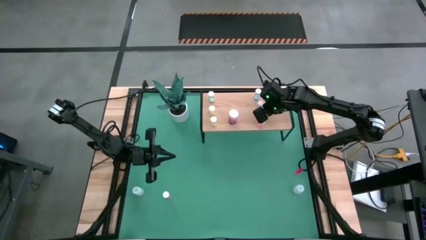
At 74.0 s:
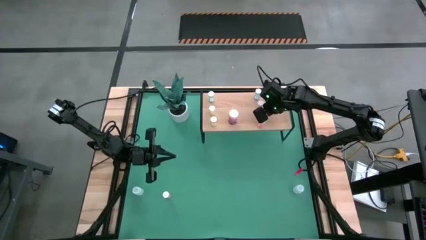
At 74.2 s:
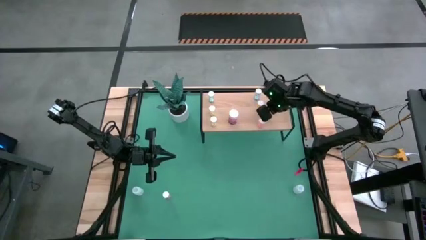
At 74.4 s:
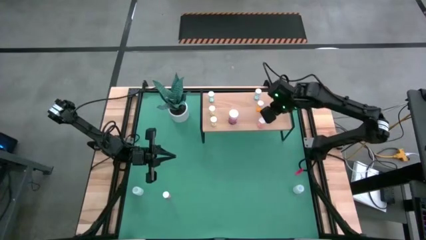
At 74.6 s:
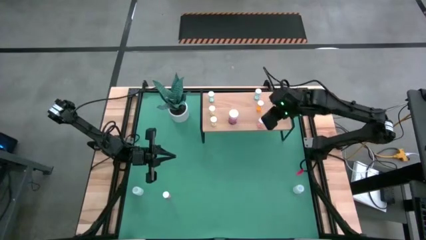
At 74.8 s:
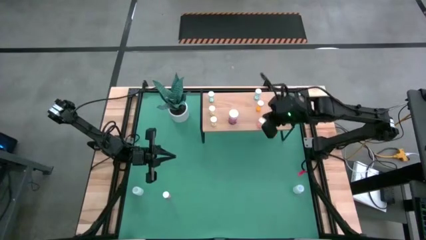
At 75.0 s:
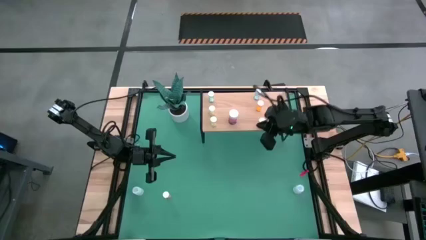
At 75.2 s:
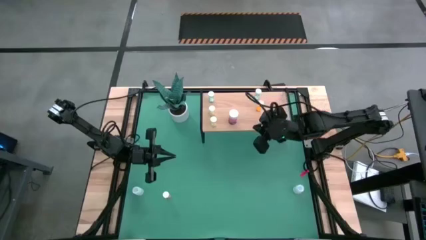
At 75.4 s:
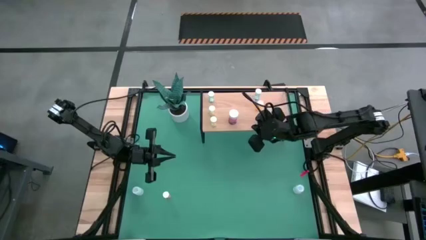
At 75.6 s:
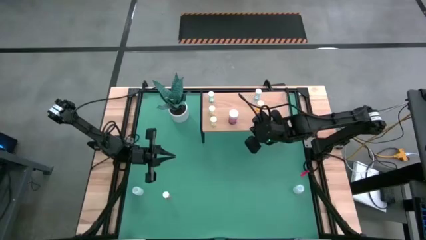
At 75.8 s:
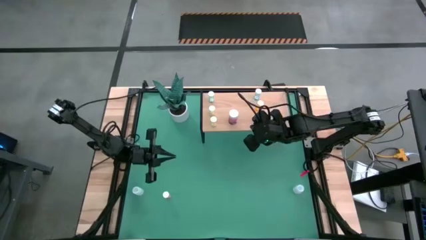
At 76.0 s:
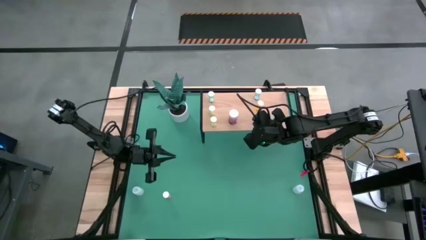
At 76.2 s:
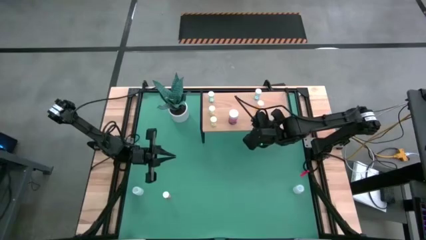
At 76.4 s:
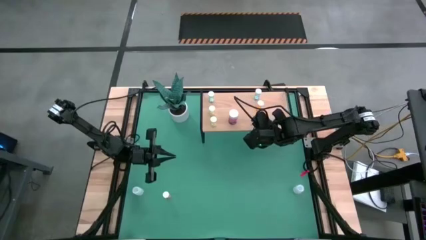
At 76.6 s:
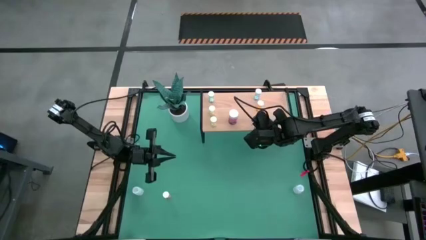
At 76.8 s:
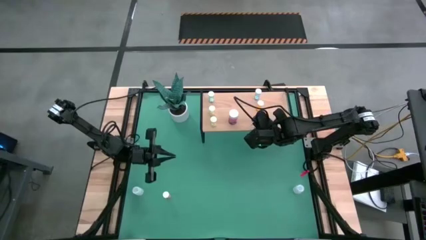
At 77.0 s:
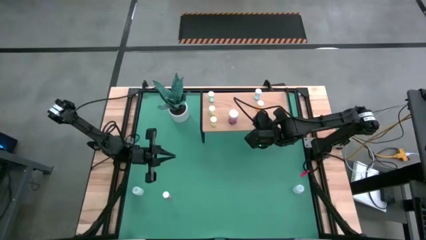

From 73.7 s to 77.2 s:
Task: Pick and place medicine bottles onto shelf by color
Adjust the light pink medicine bottle on the shelf

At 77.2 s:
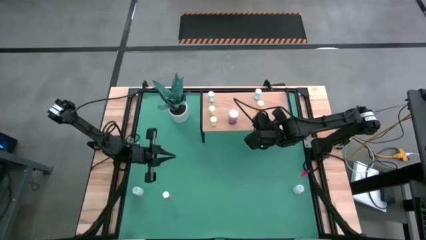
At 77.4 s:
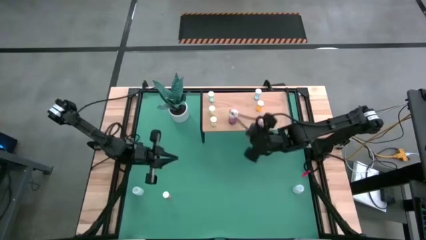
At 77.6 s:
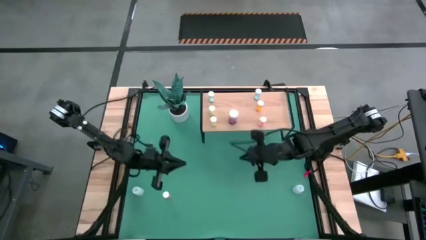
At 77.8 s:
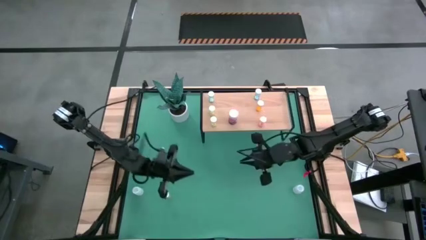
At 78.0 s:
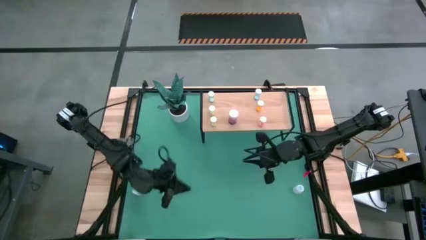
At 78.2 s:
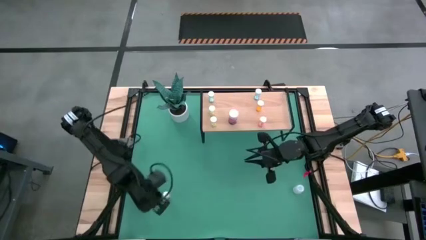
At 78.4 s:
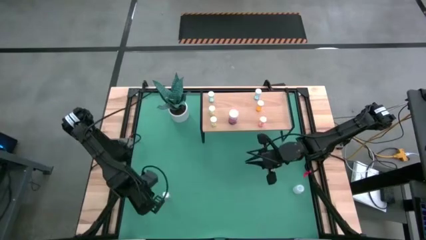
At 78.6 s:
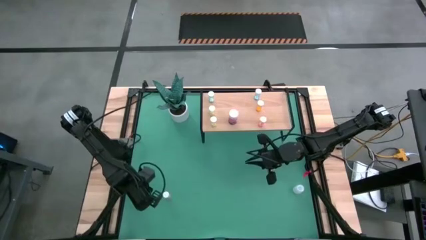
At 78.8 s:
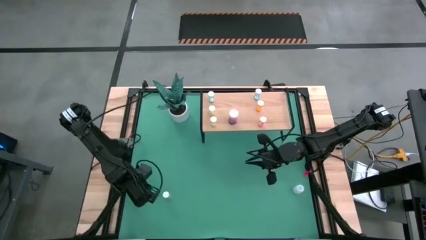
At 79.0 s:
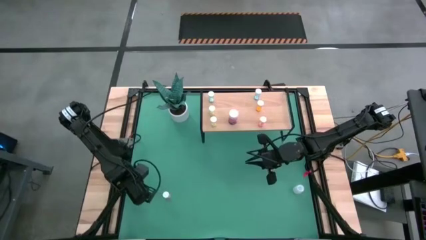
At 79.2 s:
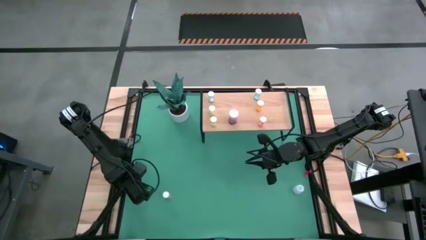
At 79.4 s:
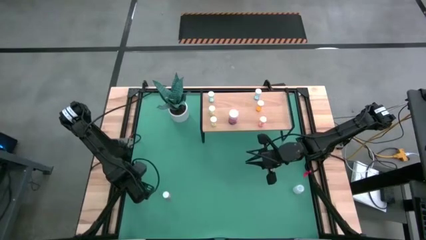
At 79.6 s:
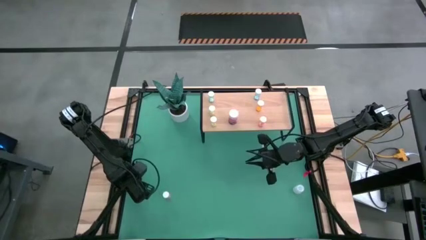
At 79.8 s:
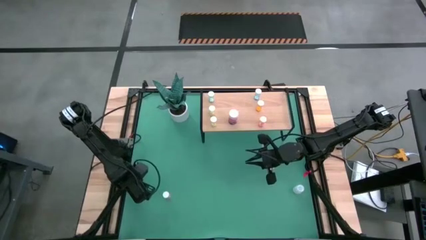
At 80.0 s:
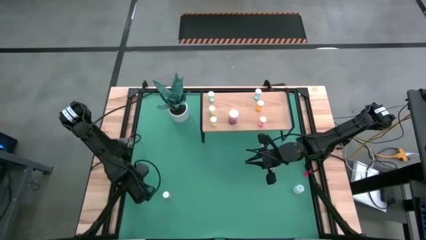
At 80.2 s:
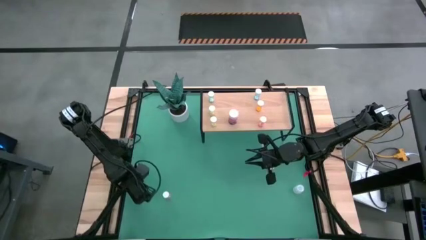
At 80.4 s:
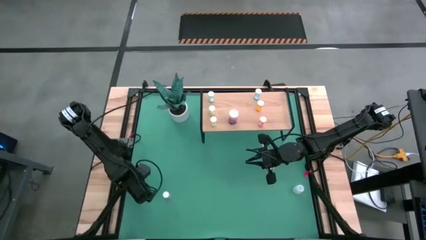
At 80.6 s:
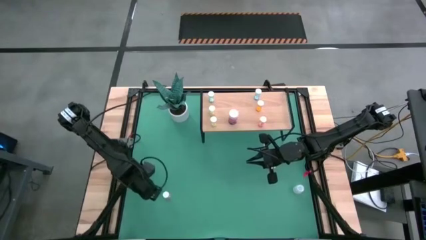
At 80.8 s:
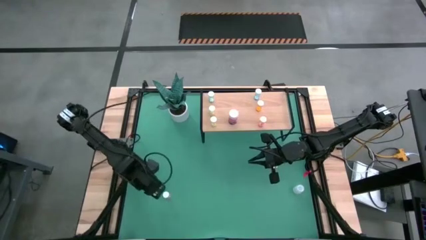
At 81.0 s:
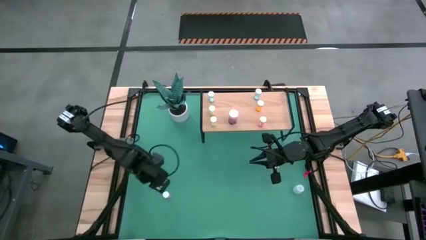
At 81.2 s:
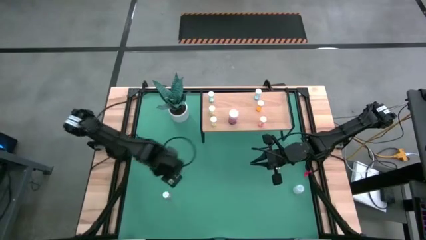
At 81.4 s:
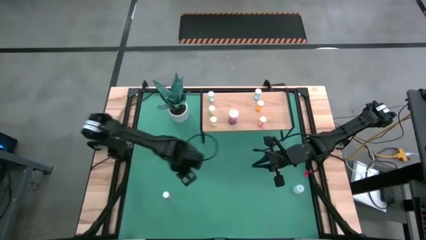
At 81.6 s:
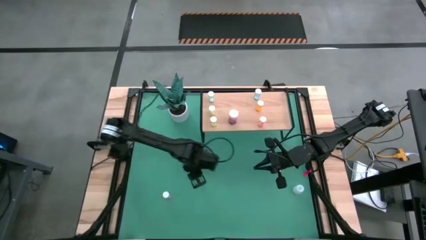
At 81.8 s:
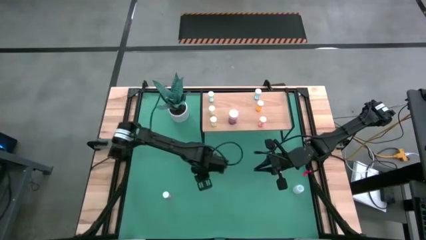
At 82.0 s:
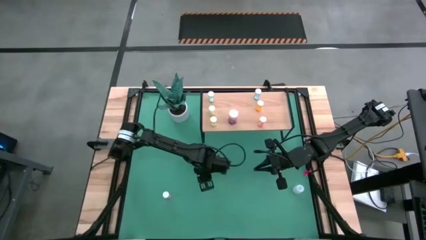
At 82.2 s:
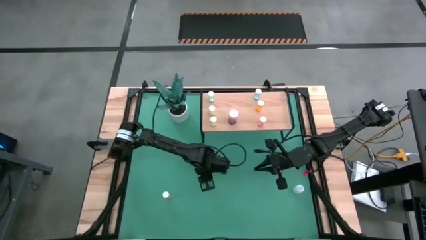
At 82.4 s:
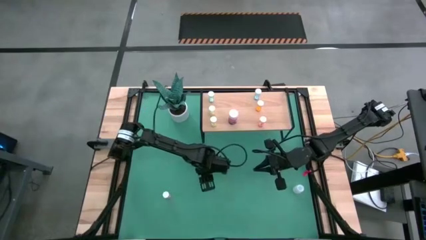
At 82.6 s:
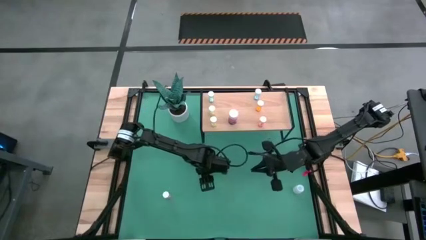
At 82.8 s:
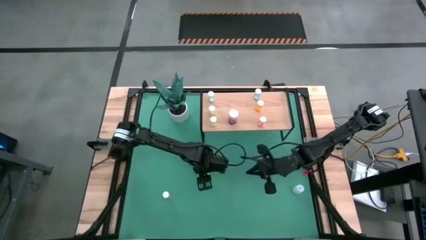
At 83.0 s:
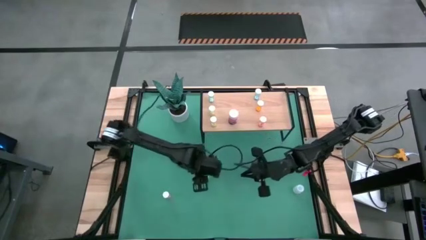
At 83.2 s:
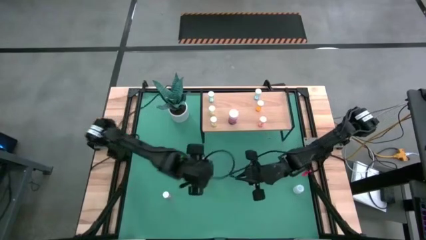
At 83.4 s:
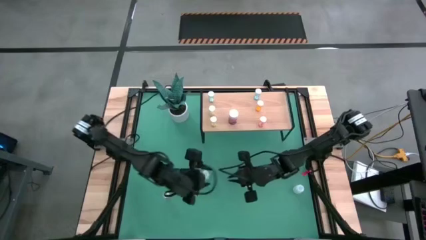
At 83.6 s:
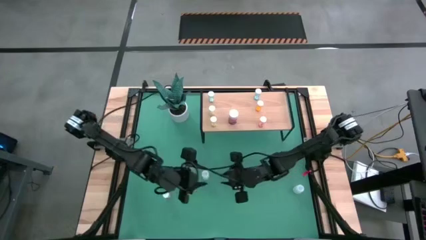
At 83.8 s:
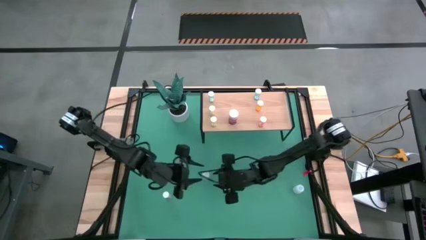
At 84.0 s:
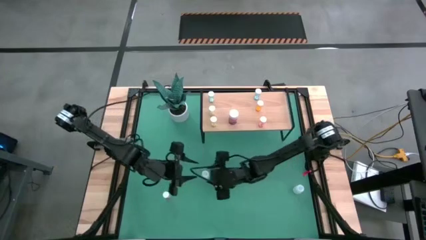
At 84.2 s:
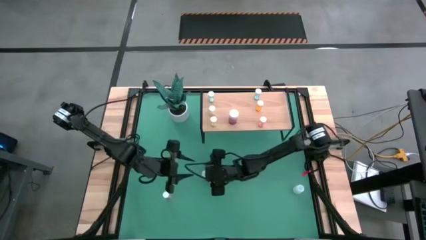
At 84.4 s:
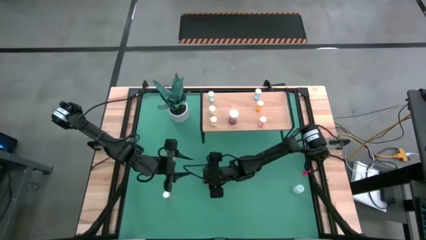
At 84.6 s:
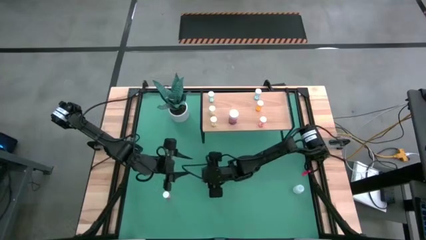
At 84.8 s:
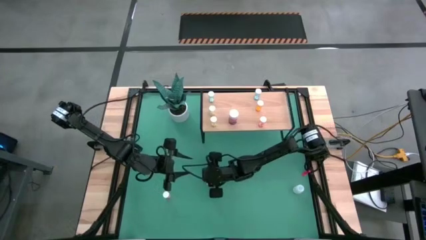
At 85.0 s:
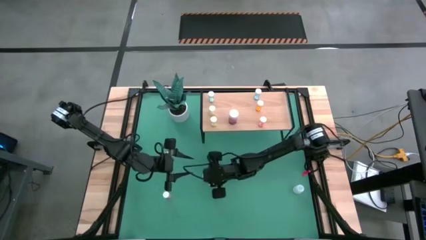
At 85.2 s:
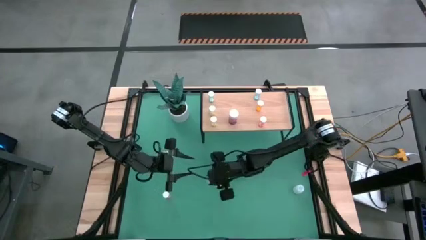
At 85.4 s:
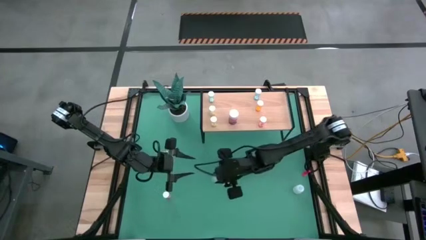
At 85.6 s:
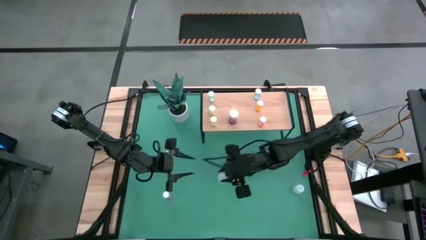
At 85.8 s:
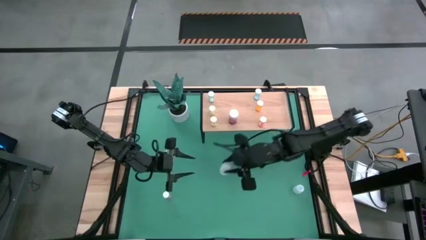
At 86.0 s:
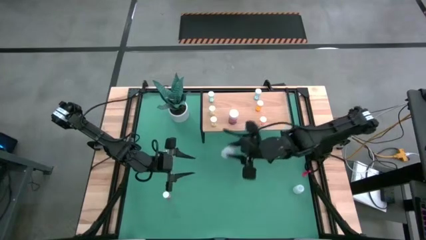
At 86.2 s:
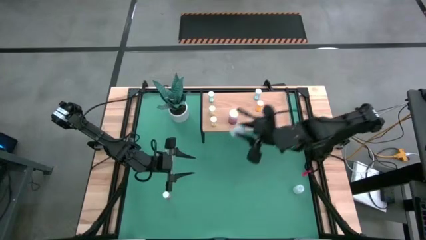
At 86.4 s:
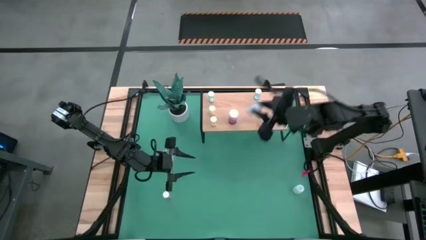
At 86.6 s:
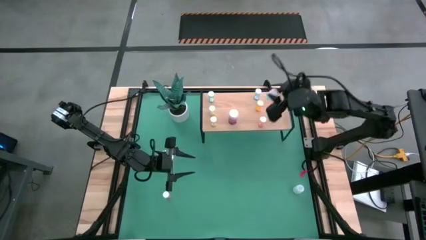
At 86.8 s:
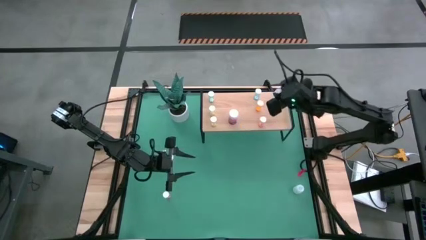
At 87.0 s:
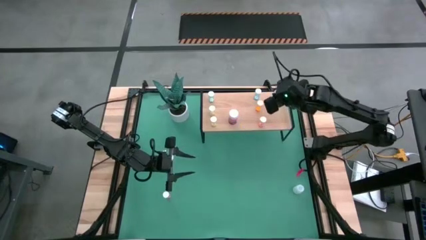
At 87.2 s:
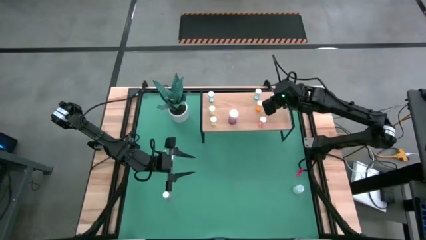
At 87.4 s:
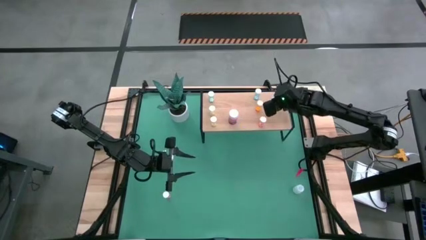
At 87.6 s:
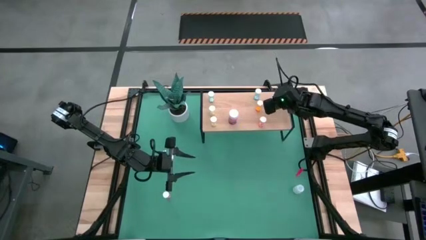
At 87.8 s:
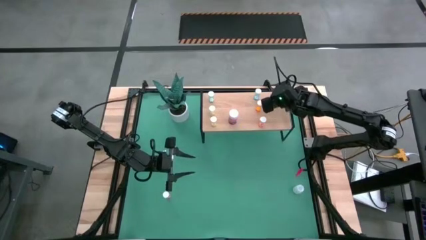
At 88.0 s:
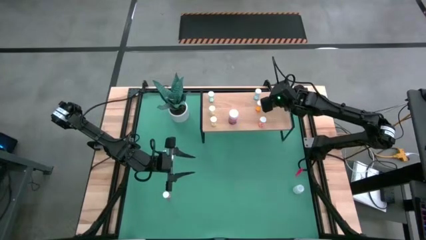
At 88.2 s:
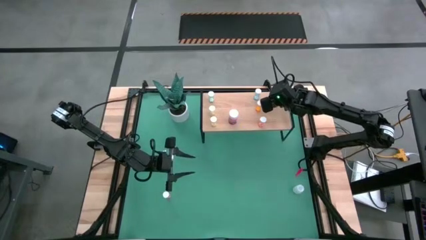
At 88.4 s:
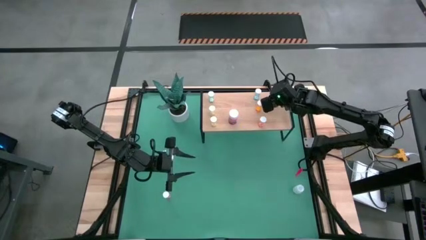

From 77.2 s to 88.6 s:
Put the left white pill bottle on the shelf

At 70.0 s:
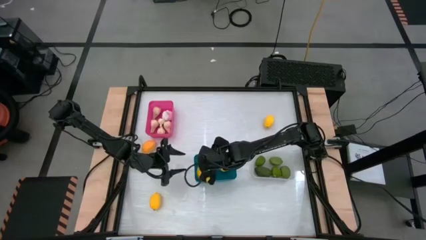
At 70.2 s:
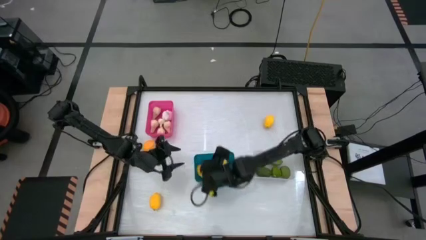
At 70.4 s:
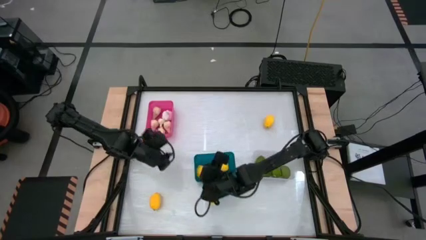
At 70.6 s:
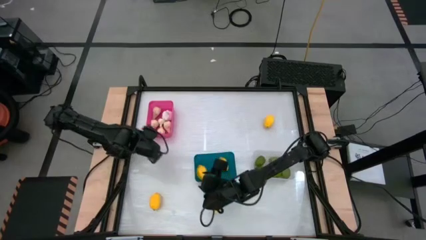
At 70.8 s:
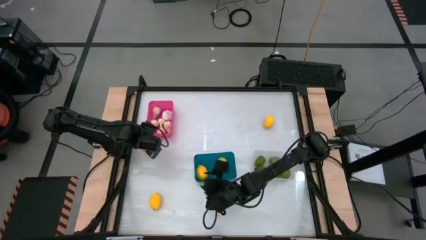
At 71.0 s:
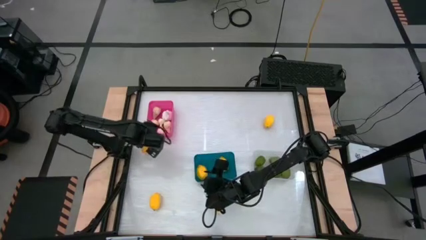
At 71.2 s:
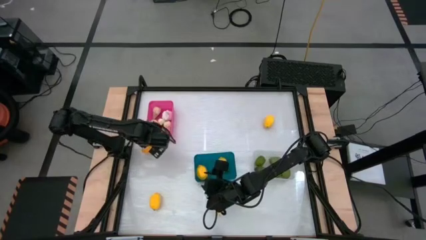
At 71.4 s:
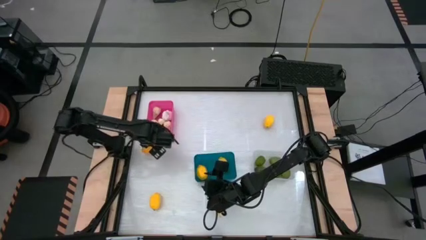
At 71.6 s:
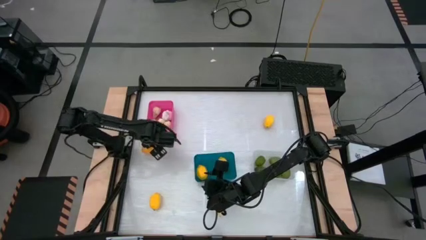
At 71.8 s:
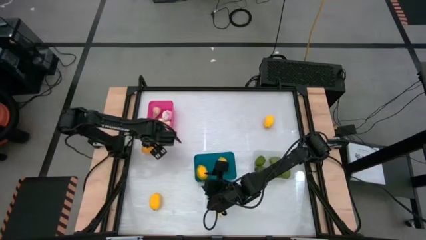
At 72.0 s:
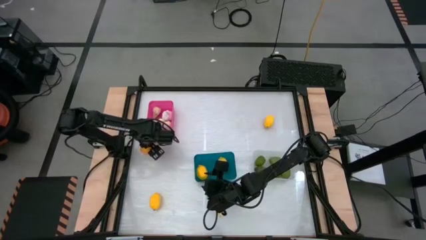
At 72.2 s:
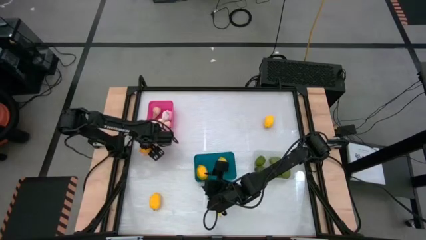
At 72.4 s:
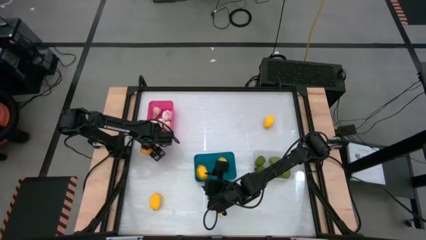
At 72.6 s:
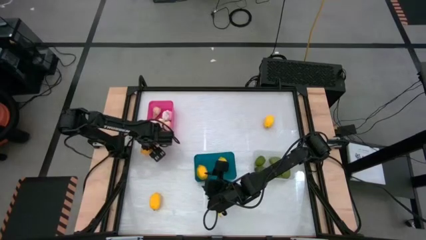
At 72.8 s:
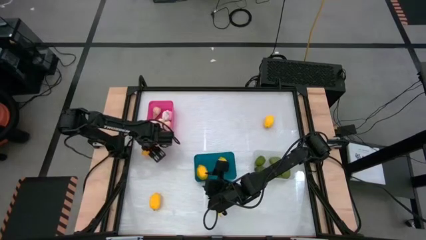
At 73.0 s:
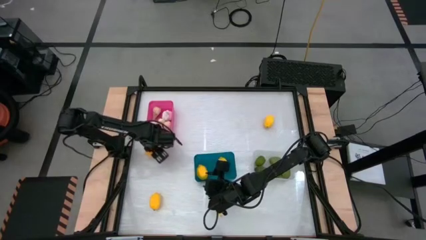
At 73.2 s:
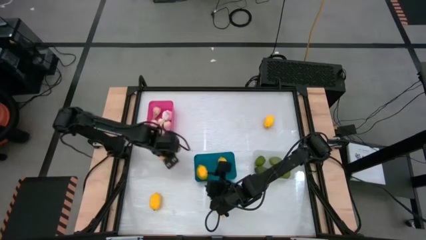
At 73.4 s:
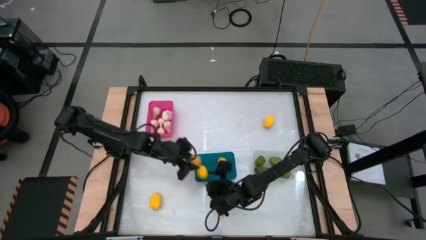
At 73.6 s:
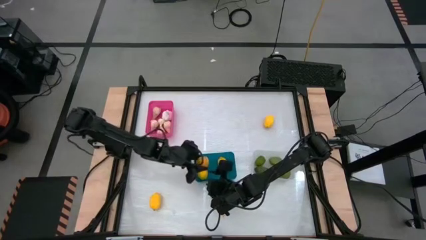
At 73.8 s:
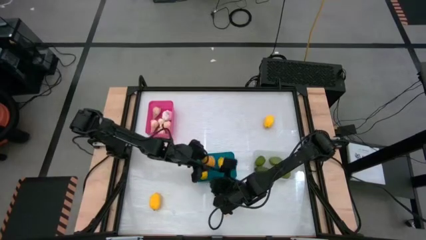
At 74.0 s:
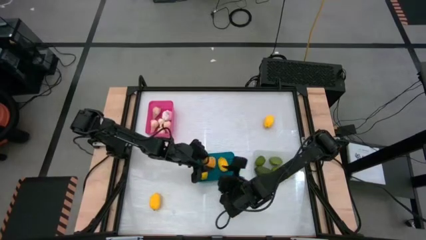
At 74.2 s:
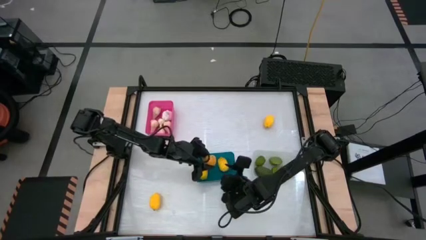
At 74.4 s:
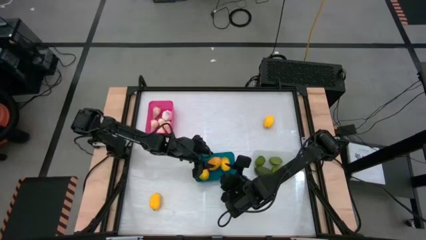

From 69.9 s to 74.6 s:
Task: Sort produce into baskets
Put the yellow lemon into the blue bin
